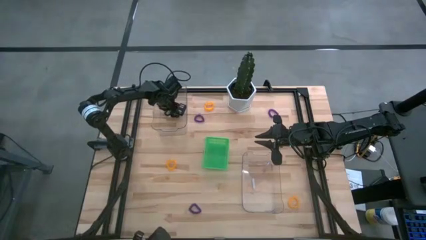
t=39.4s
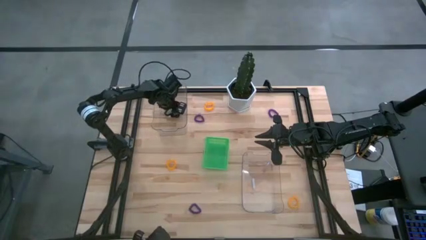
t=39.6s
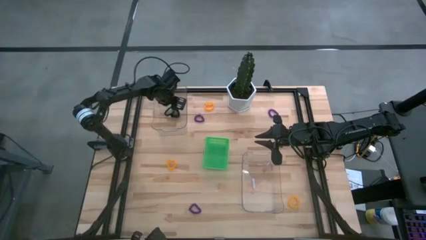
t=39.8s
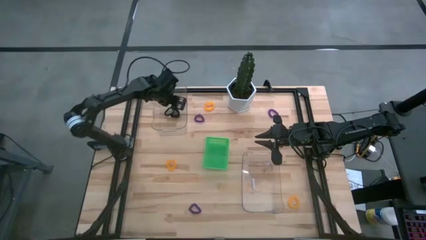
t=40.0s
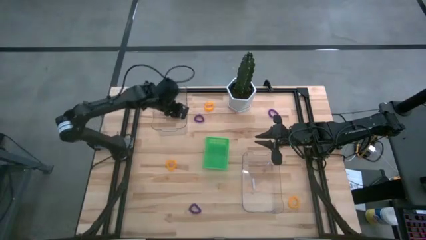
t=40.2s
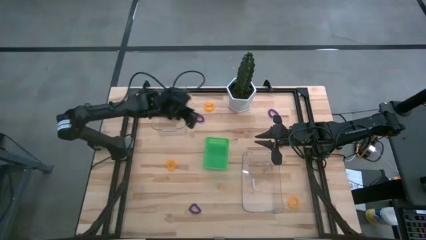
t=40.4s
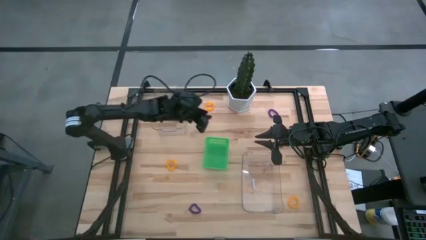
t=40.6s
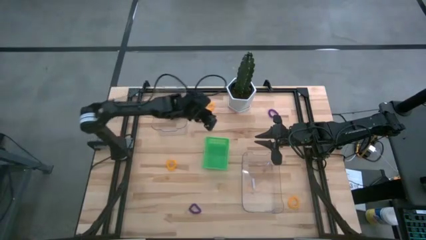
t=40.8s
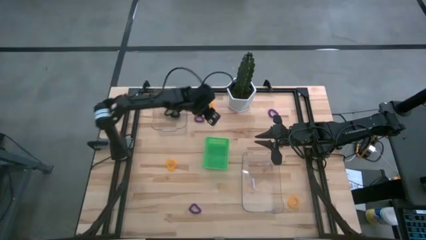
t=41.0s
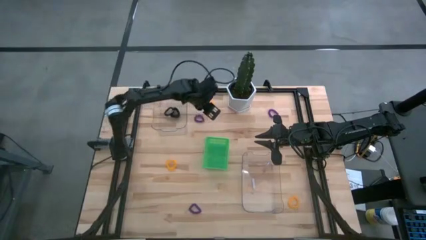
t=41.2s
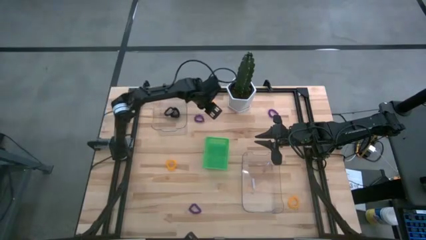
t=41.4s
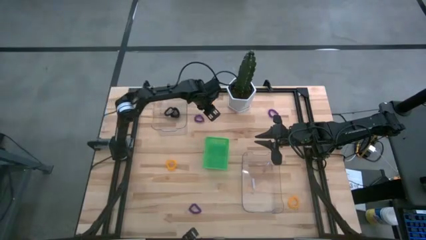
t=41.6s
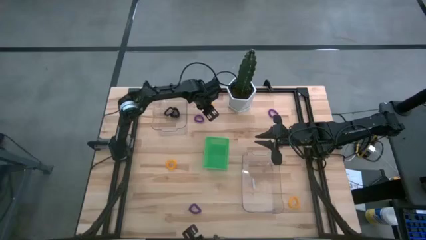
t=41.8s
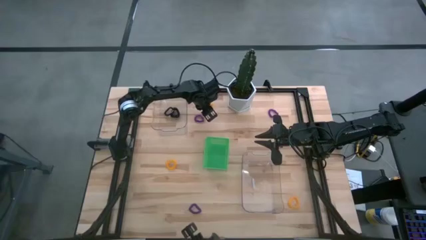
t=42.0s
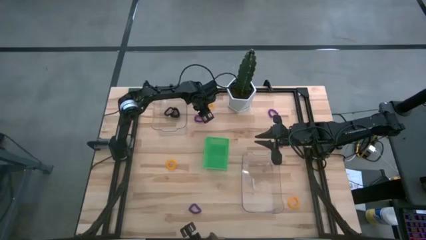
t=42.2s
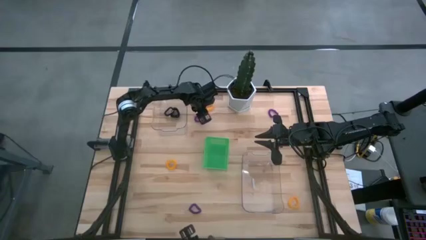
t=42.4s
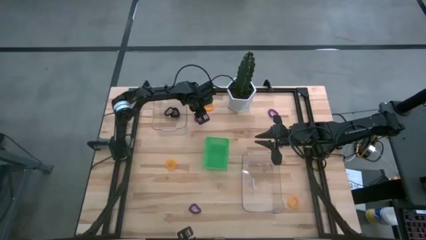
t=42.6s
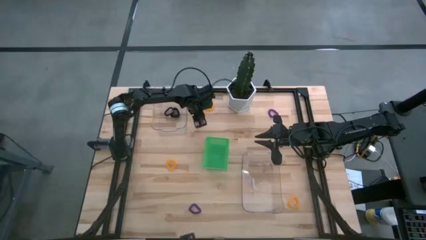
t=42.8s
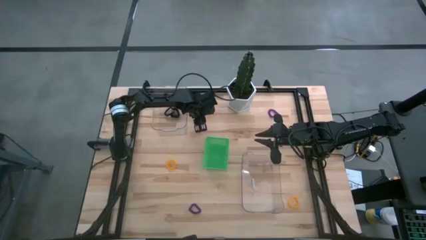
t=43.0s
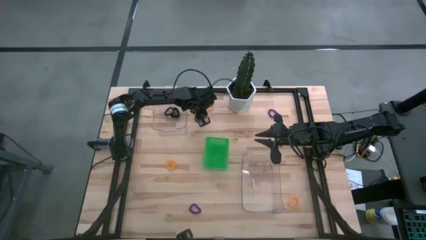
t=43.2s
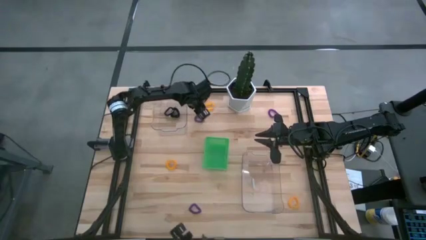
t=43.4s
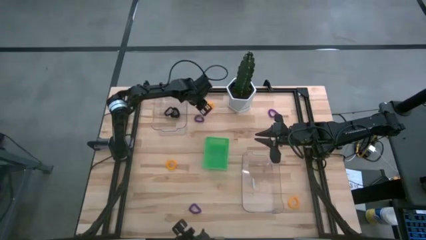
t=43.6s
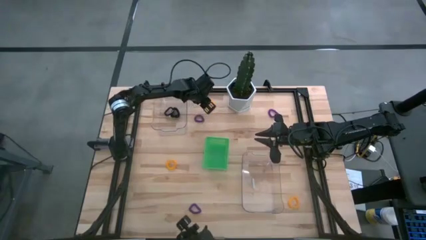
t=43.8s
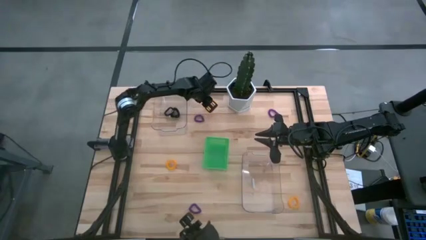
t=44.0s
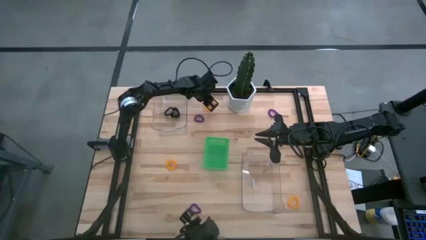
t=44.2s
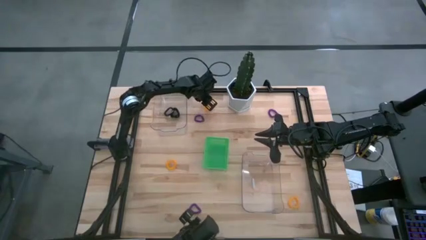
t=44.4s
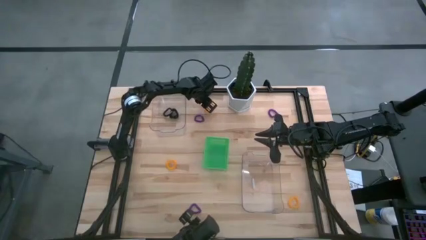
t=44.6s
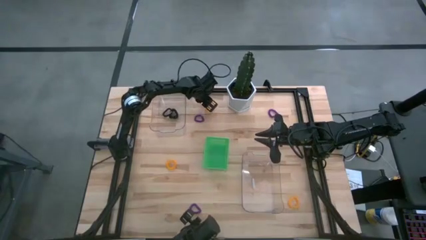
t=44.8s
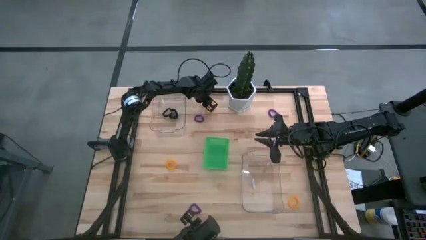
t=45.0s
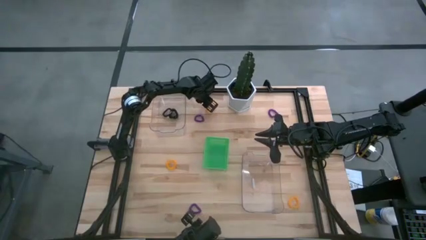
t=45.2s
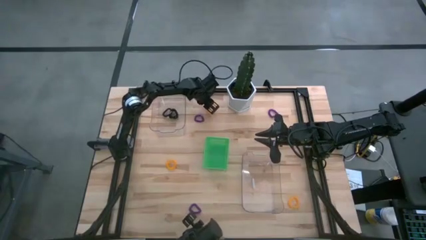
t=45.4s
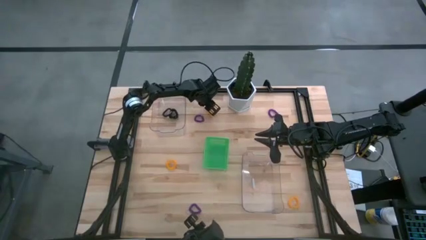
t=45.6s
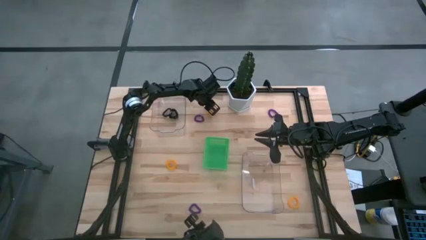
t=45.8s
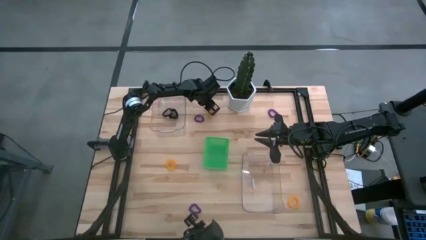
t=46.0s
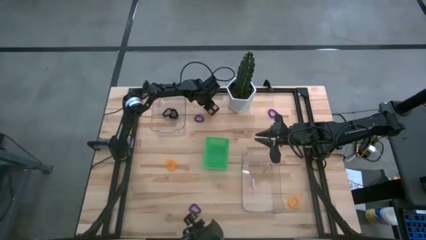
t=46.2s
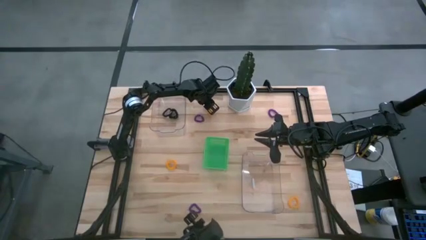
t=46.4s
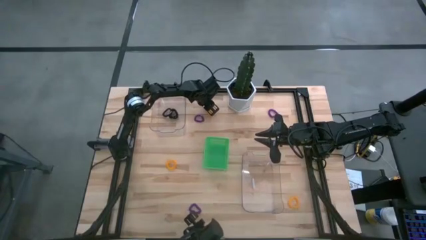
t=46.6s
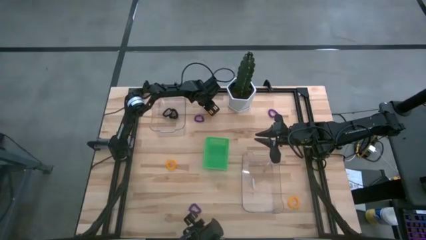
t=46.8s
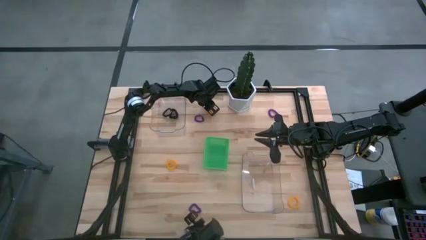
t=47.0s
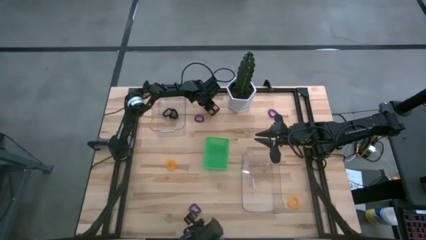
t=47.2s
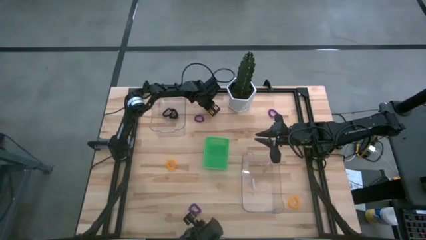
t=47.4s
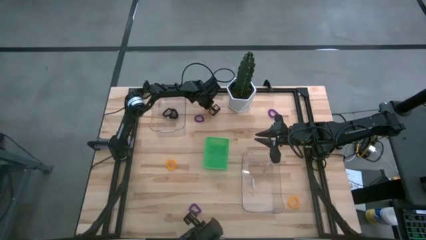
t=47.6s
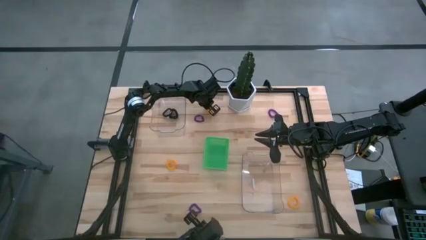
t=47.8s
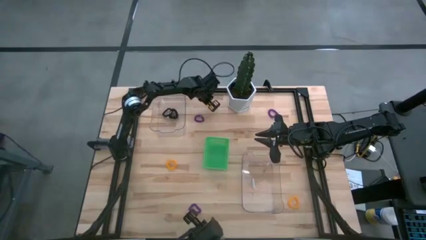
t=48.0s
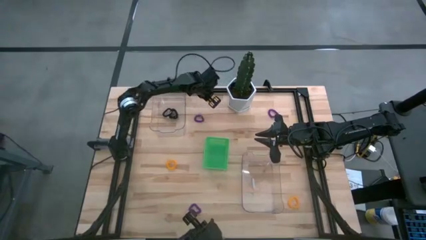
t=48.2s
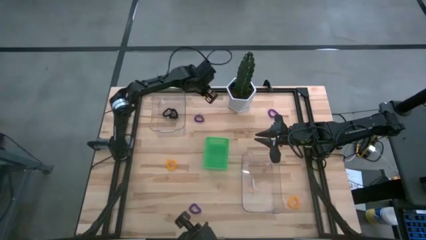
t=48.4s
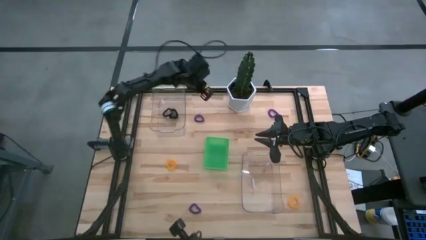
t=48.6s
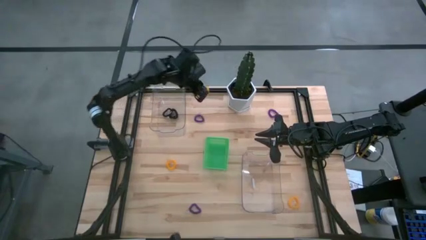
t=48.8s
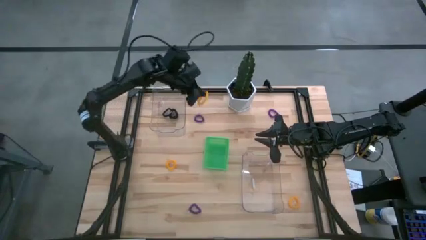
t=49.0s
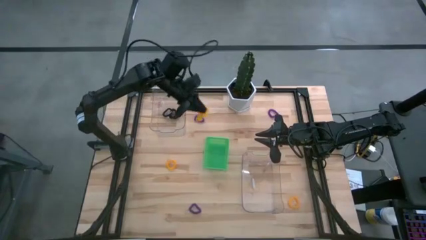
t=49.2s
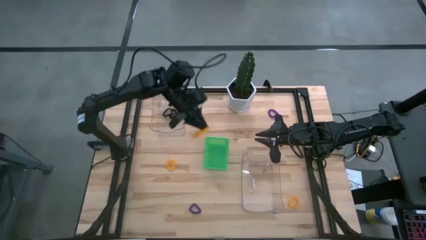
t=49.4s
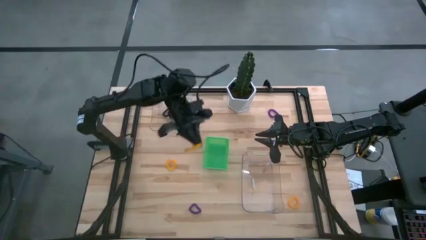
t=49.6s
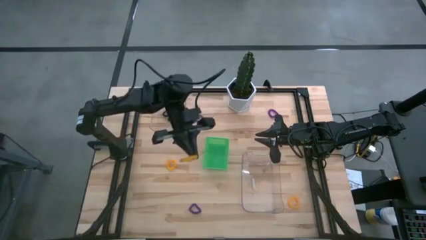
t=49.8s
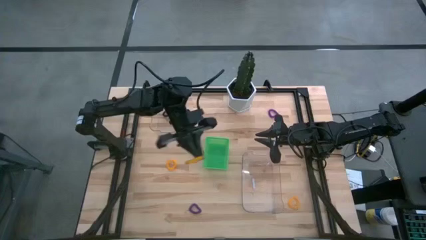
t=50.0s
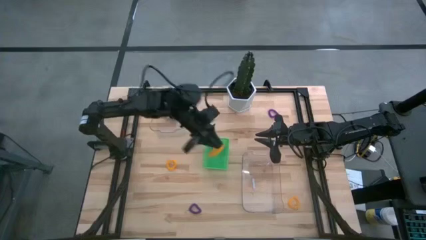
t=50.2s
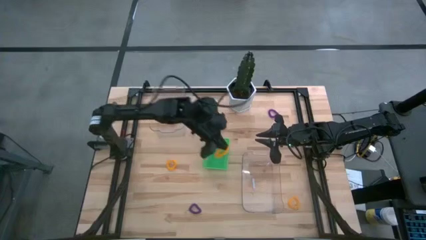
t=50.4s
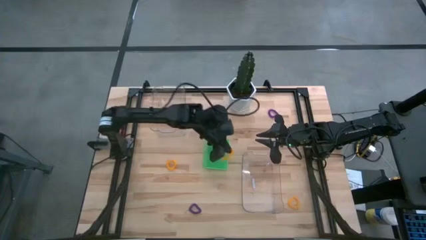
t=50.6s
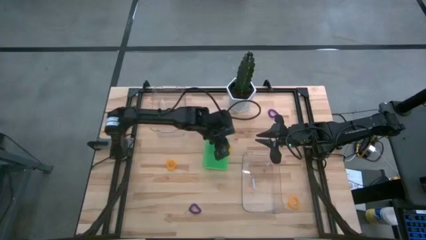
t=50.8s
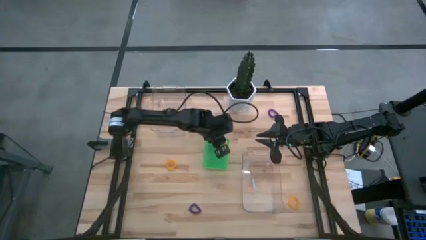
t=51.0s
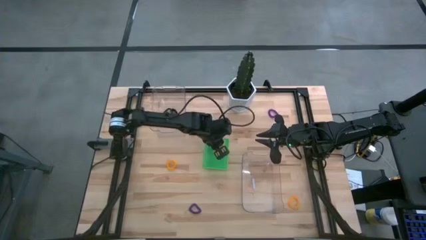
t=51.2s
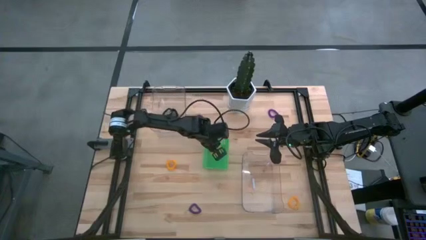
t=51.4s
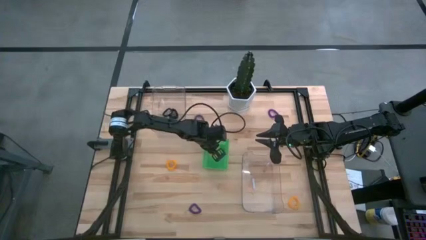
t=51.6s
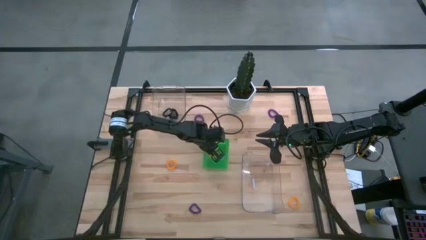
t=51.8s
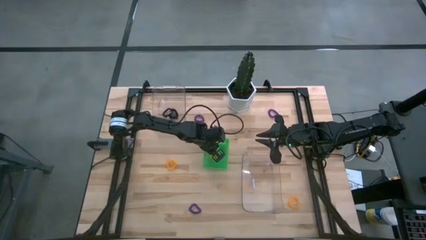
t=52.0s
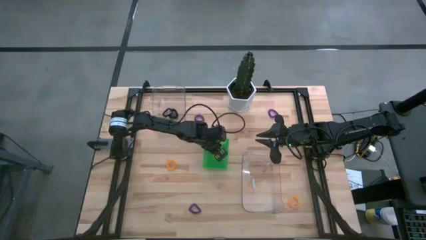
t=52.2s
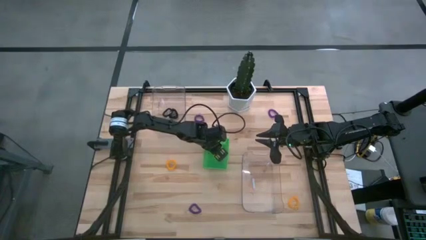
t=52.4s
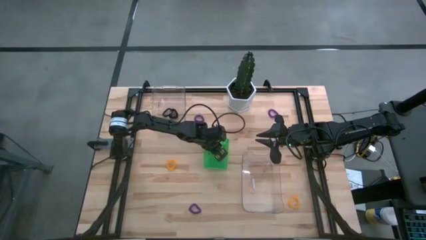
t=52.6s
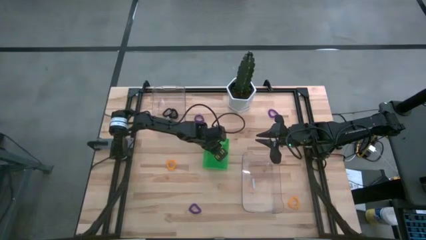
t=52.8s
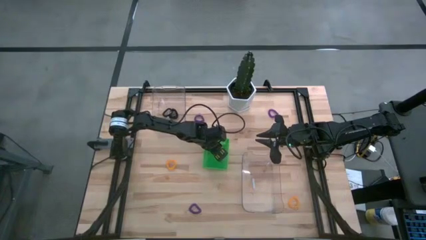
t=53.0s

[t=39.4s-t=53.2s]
Task: Sort spring keychains
Put the top orange spring keychain into the green bin

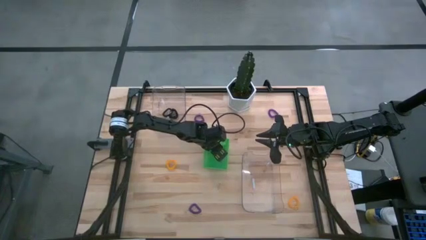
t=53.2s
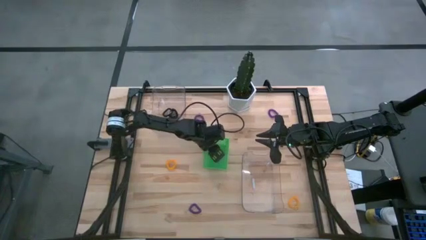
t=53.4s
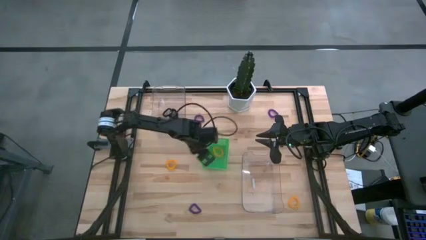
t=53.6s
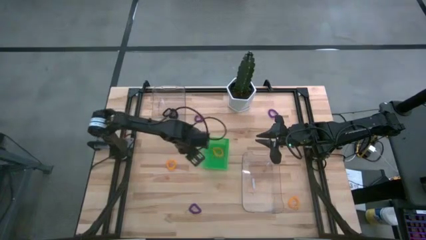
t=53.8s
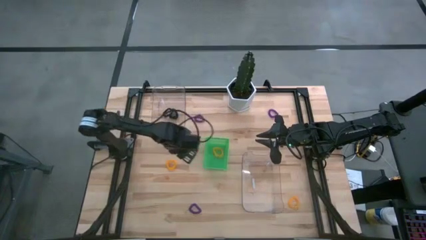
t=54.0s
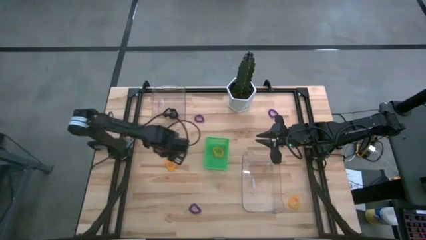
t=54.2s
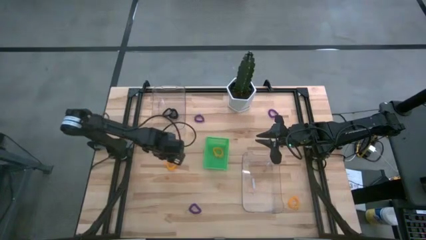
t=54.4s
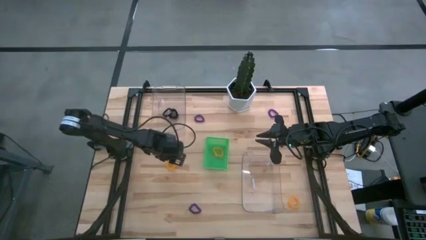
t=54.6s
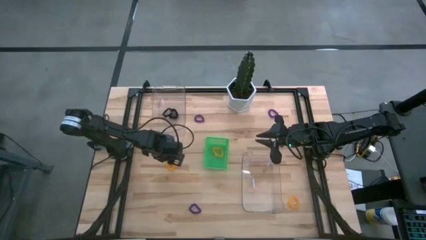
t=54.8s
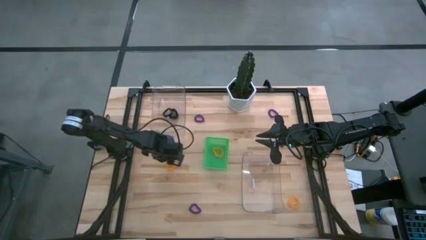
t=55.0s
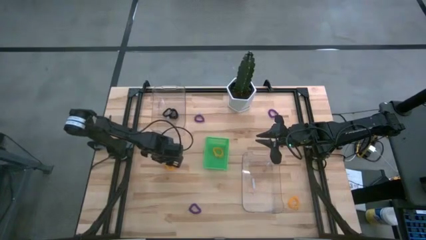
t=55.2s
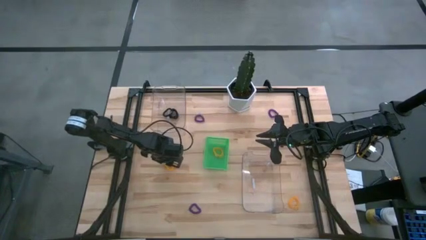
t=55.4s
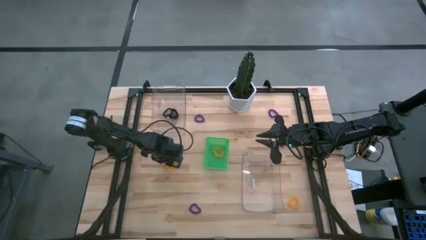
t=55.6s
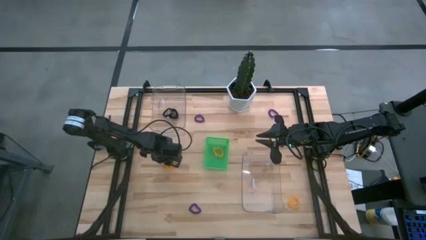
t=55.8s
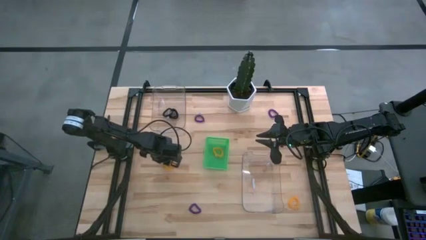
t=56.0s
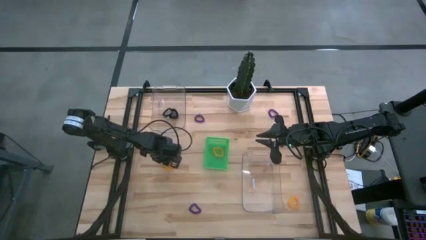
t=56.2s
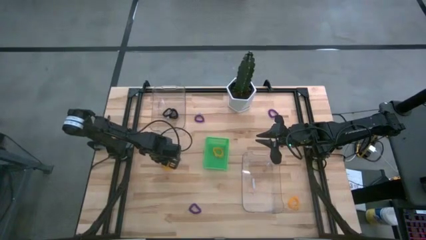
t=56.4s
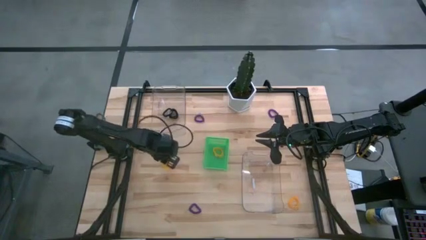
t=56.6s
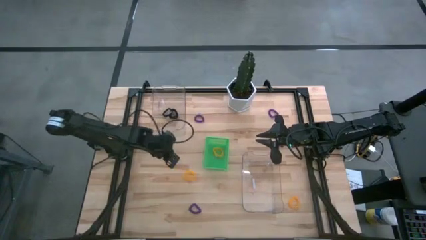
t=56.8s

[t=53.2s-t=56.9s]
Put the left orange spring keychain into the green bin
